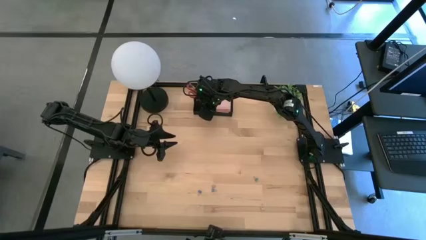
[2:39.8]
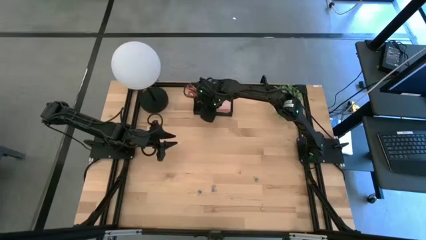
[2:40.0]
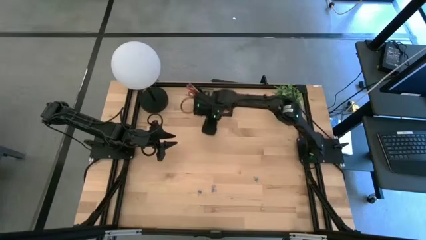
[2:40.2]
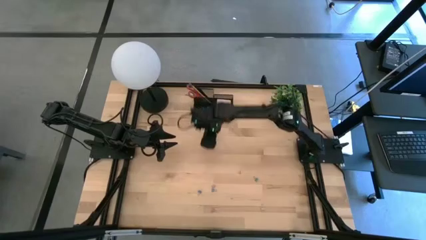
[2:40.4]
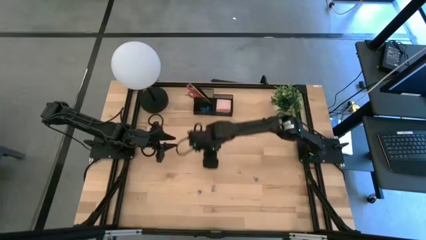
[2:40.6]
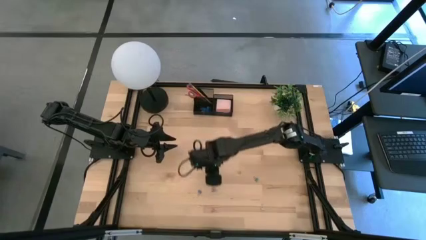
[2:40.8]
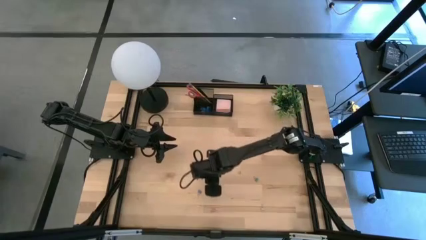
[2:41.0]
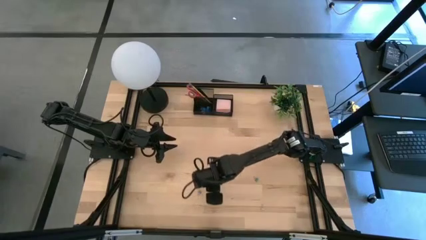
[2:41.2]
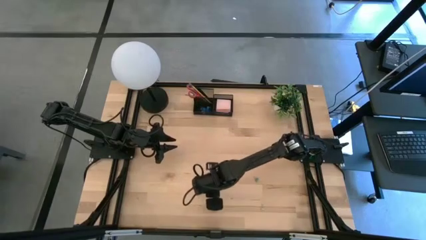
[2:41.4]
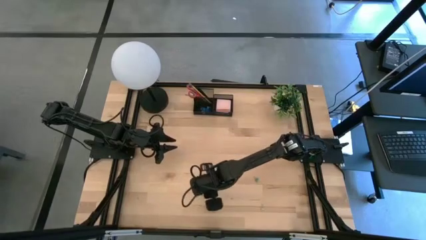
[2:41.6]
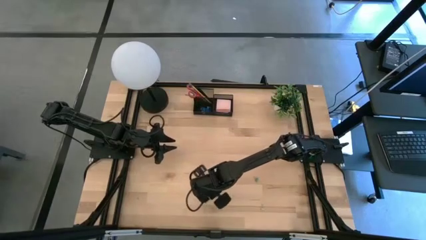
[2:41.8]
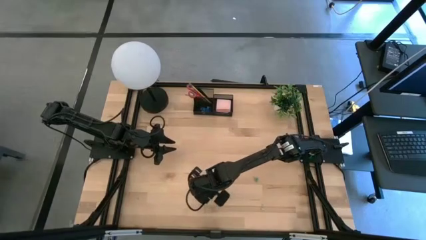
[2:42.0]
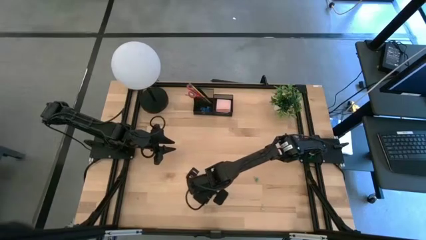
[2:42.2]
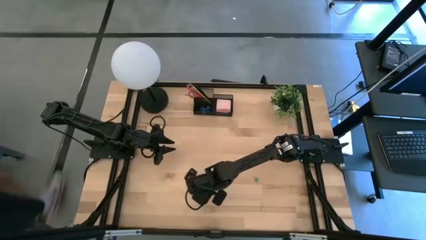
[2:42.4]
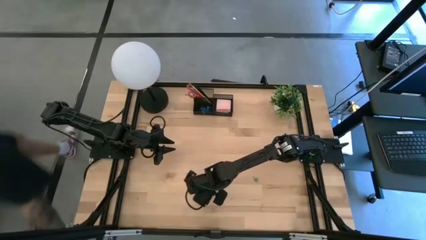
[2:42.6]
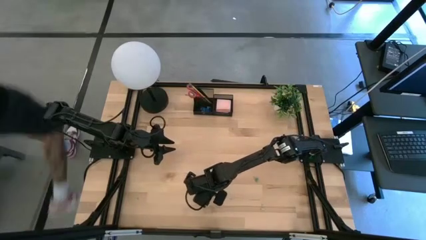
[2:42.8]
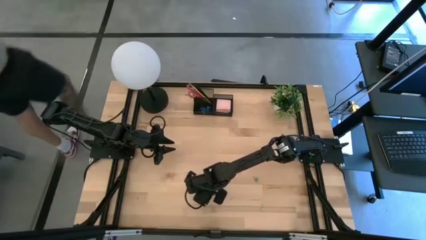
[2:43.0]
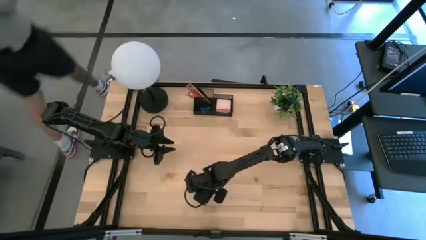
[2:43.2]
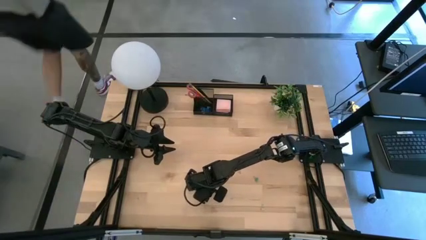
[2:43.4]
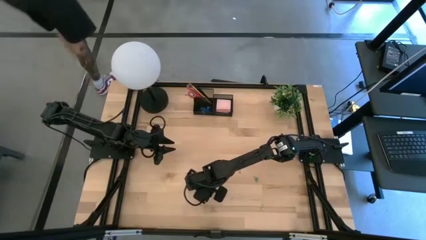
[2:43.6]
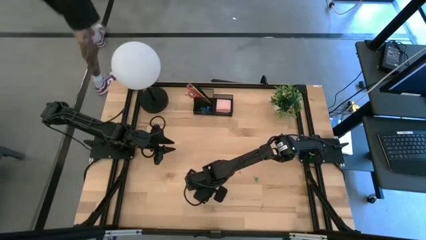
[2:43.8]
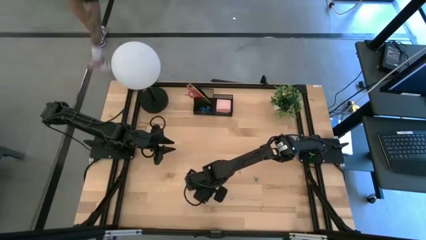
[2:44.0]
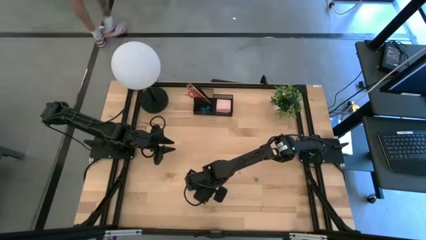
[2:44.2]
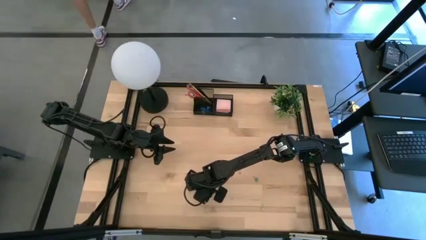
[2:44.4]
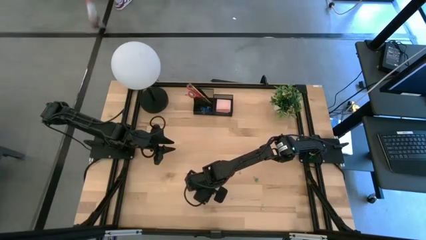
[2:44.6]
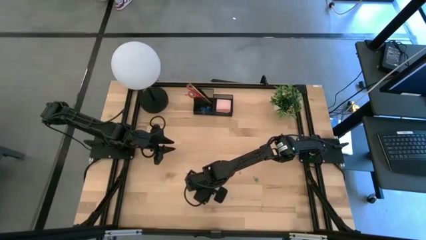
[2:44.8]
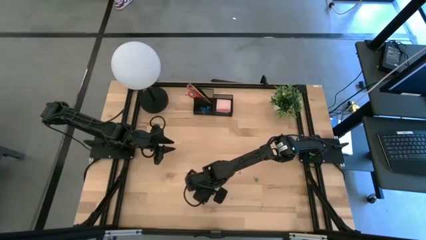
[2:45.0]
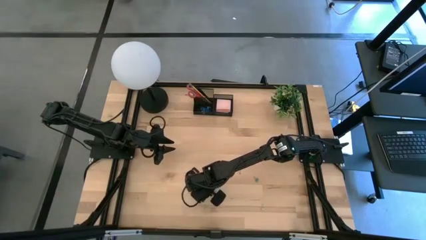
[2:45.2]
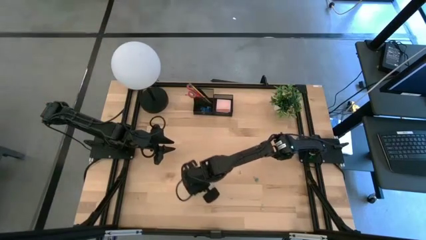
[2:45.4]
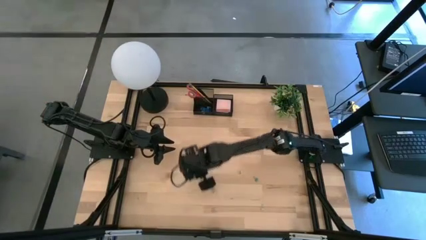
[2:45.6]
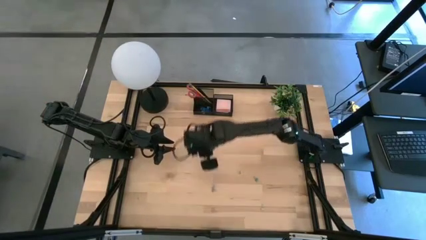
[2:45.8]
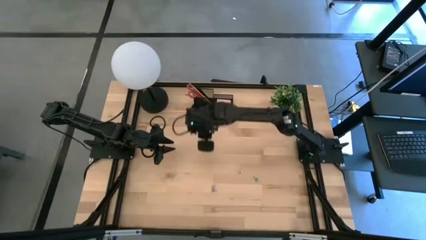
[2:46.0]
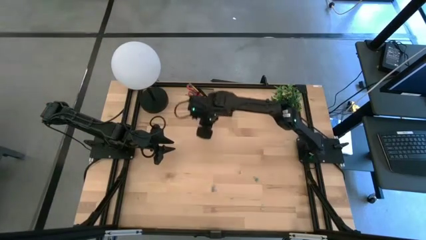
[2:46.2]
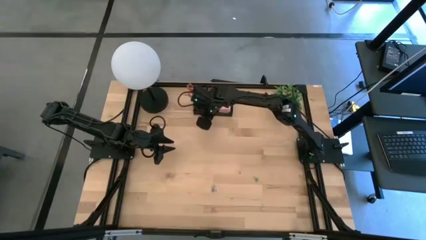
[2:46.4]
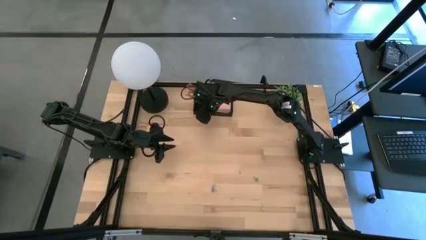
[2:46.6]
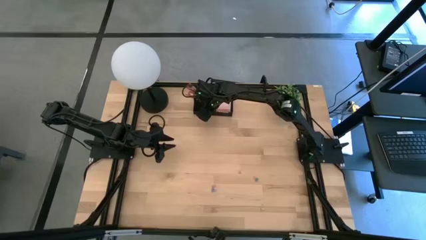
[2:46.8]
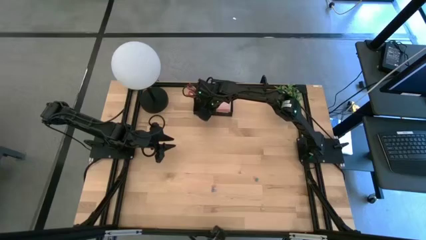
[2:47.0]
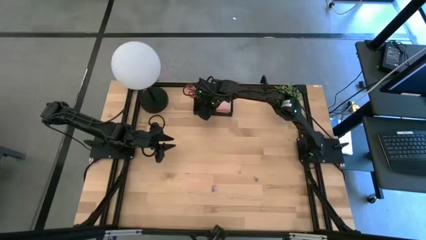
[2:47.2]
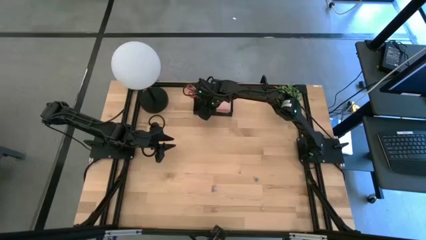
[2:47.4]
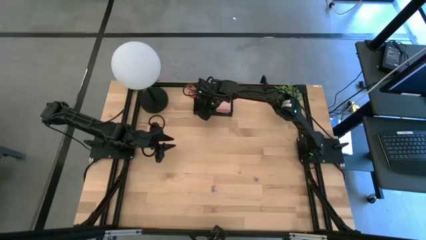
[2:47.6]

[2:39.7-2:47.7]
Task: Pick and place office supplies into organizer
Put the blue binder clip into the black desk organizer
